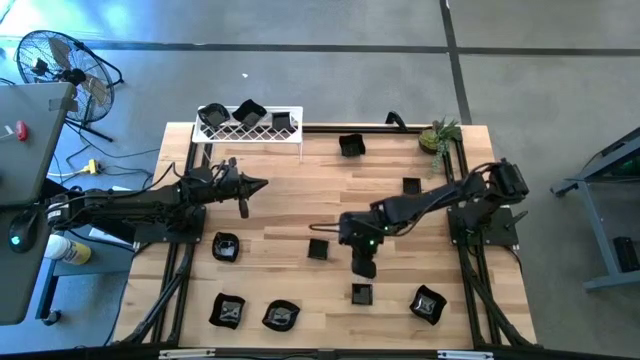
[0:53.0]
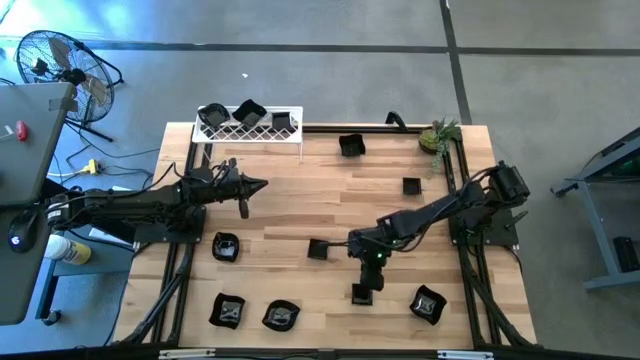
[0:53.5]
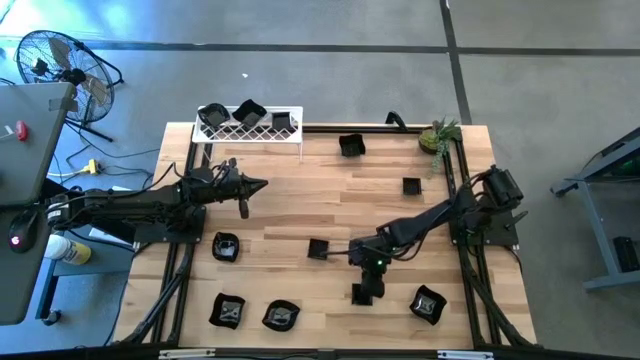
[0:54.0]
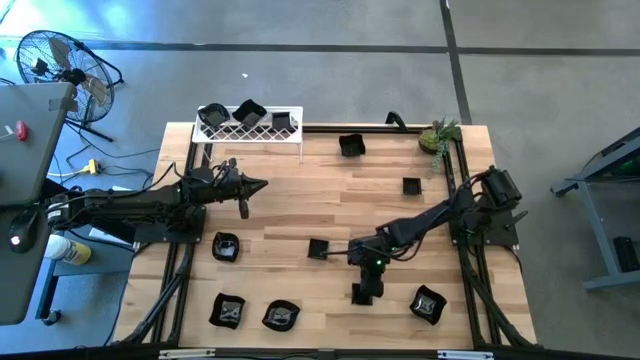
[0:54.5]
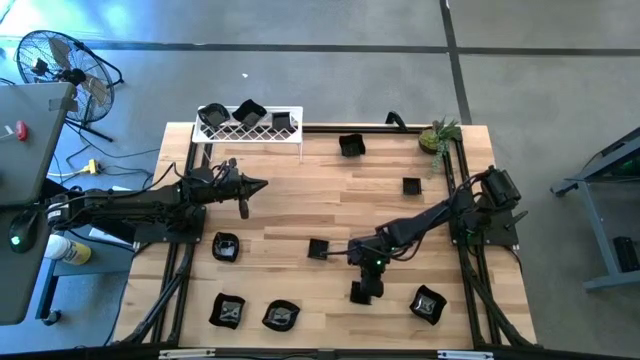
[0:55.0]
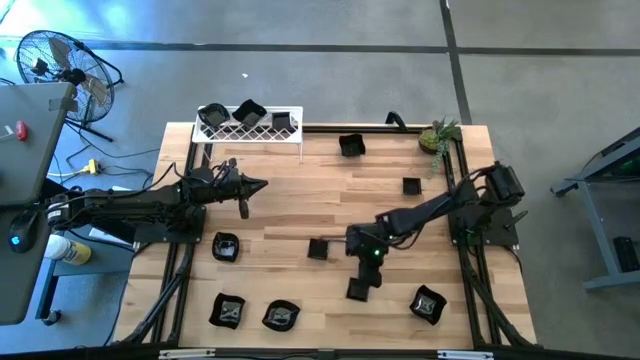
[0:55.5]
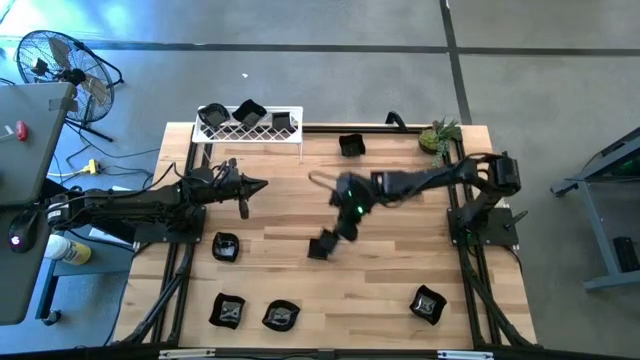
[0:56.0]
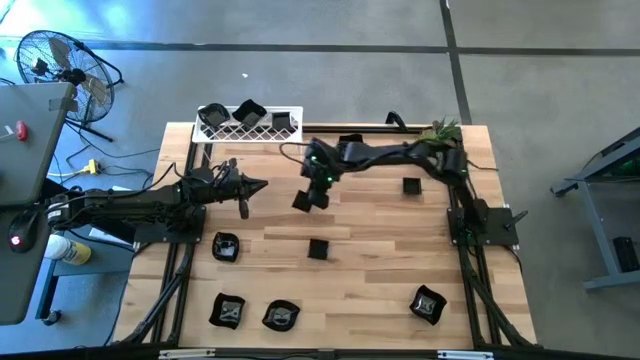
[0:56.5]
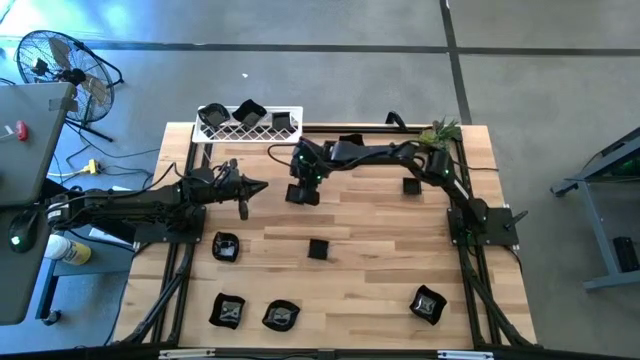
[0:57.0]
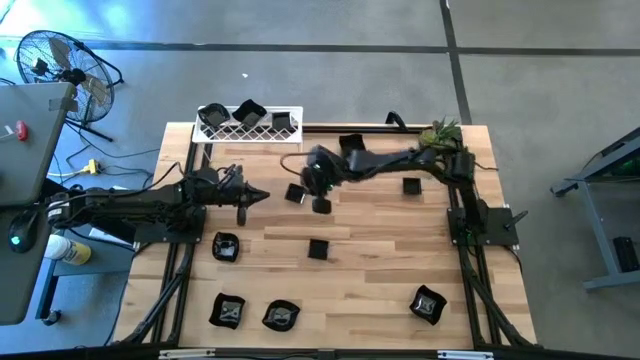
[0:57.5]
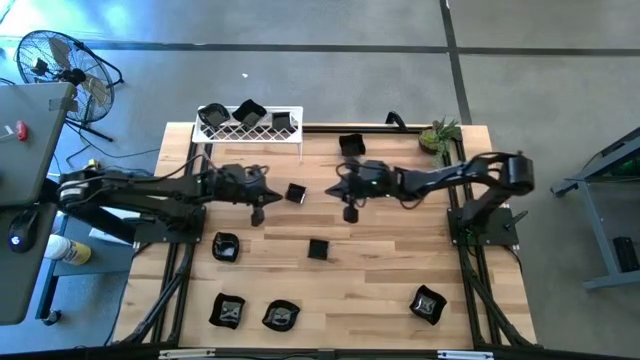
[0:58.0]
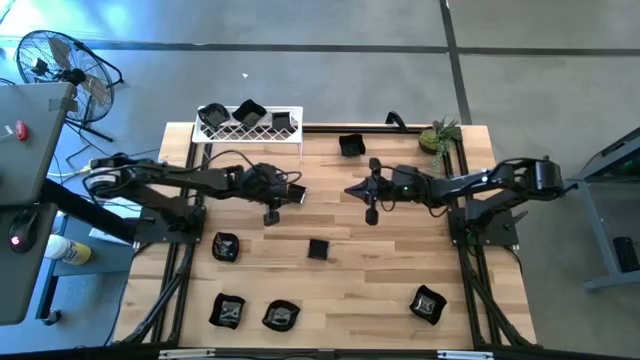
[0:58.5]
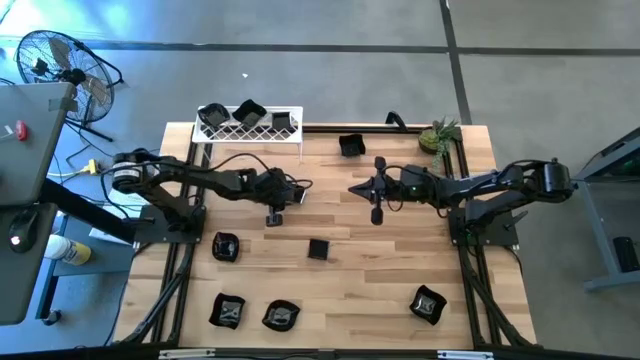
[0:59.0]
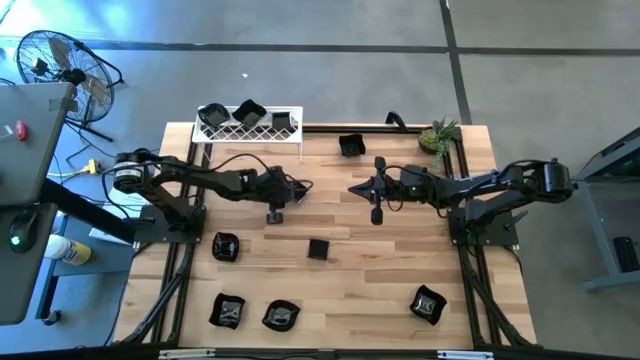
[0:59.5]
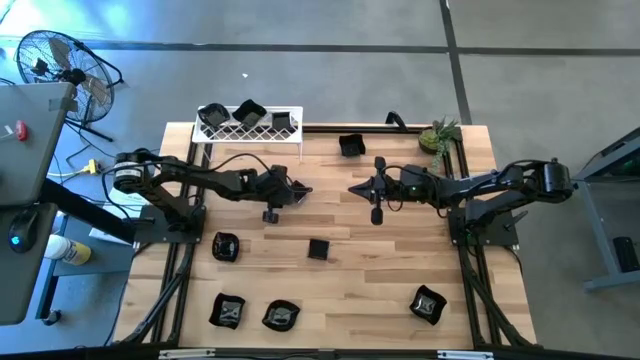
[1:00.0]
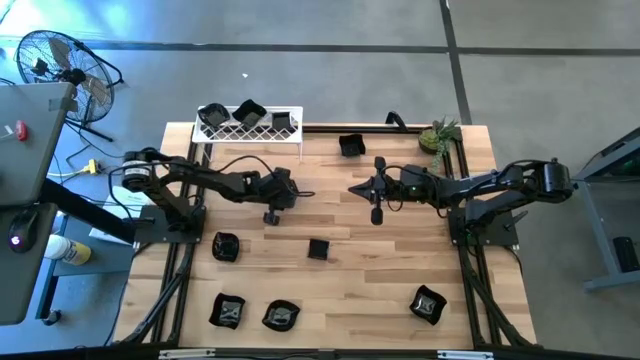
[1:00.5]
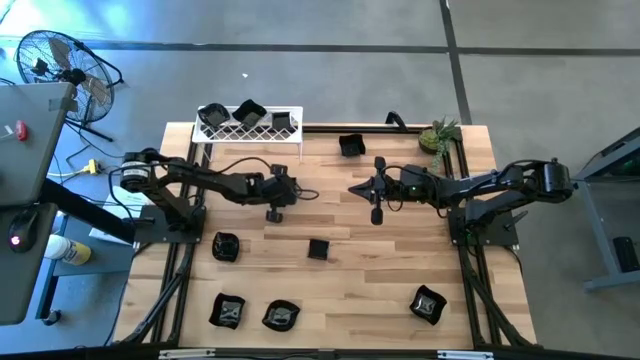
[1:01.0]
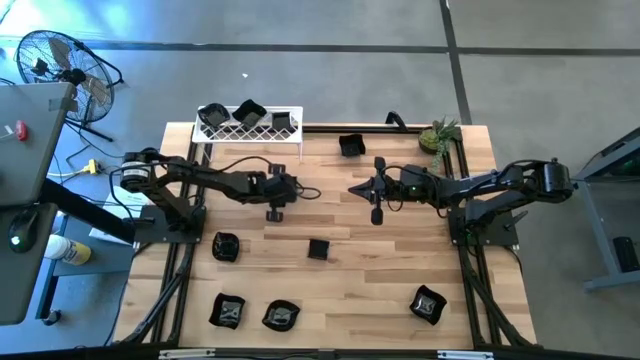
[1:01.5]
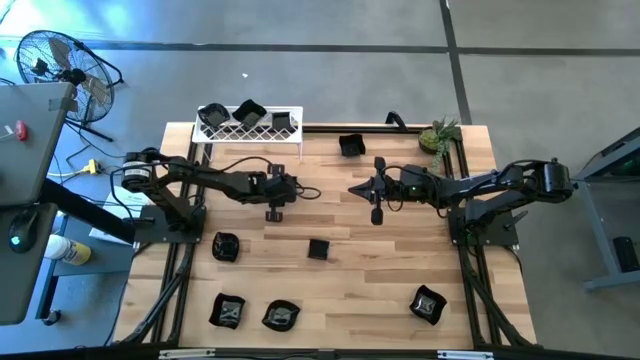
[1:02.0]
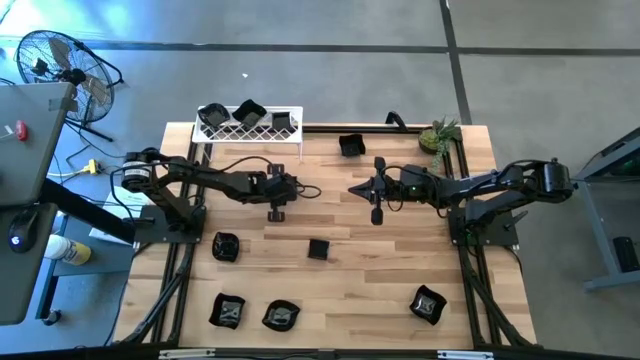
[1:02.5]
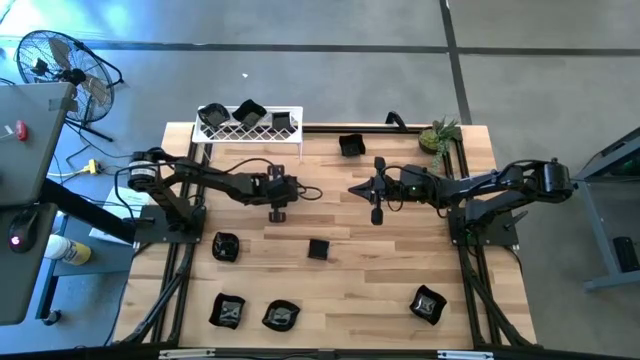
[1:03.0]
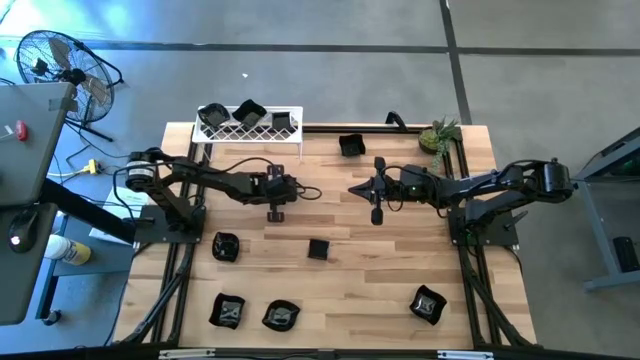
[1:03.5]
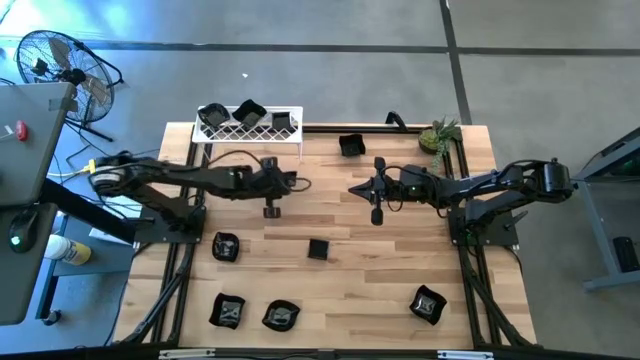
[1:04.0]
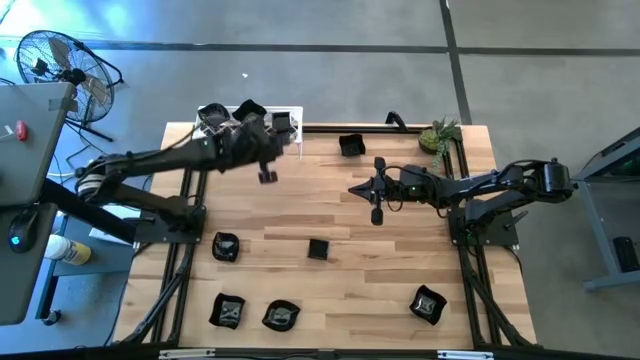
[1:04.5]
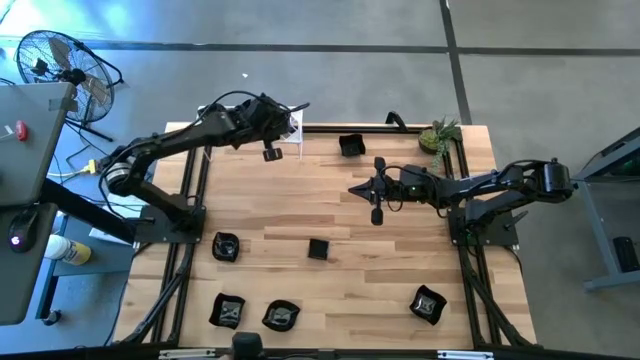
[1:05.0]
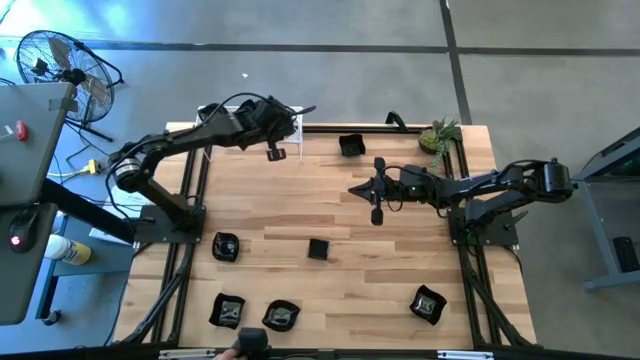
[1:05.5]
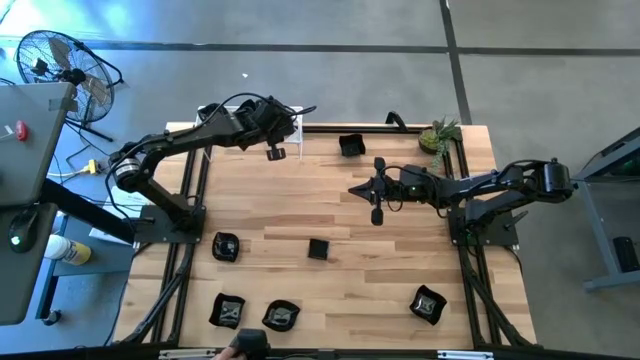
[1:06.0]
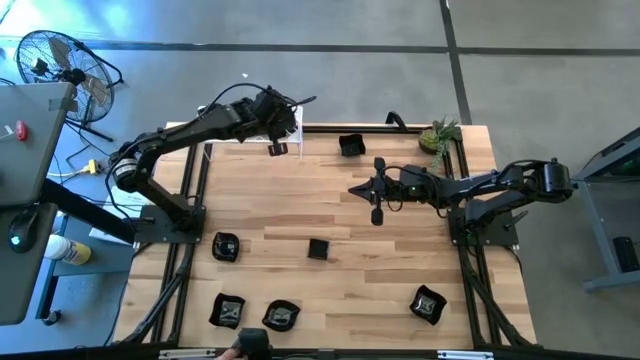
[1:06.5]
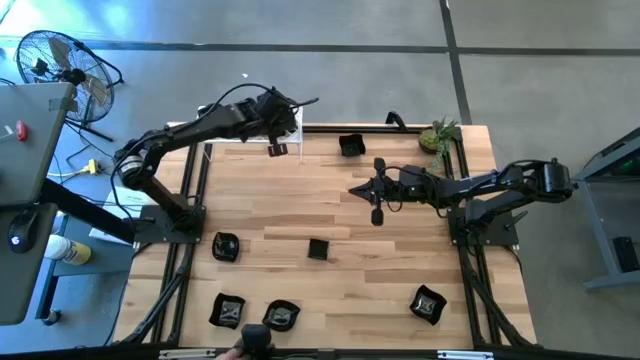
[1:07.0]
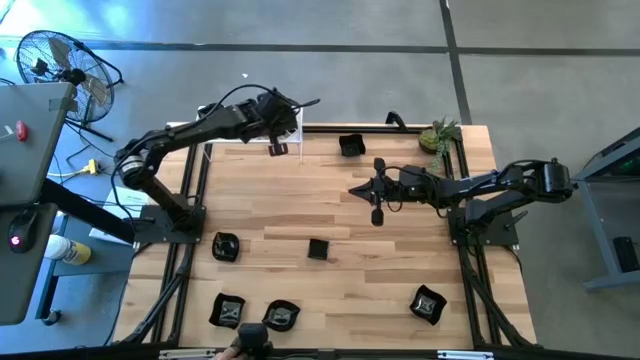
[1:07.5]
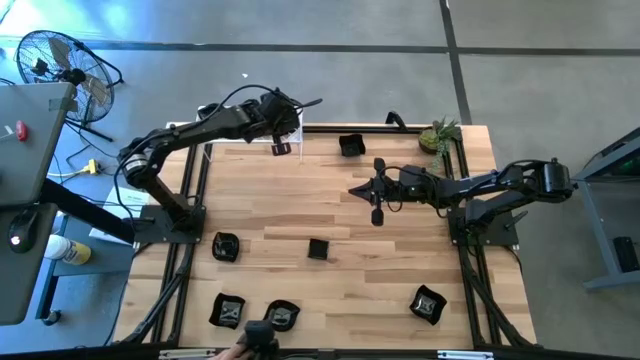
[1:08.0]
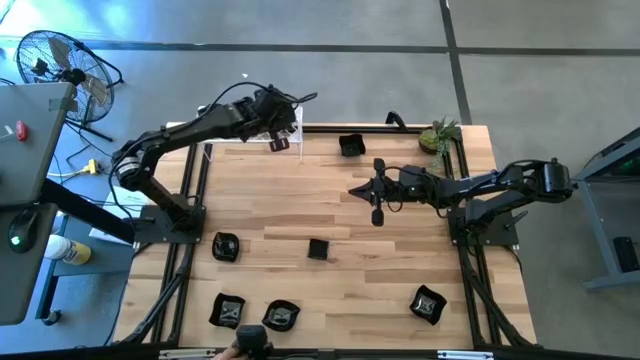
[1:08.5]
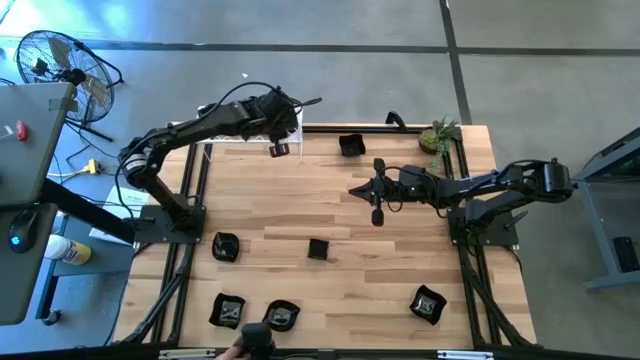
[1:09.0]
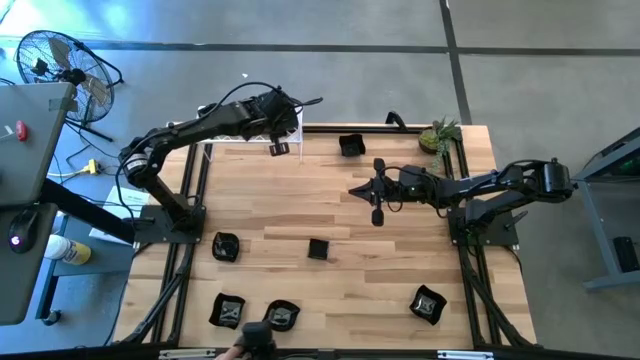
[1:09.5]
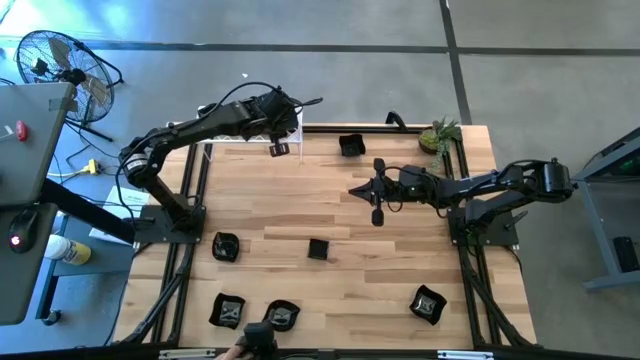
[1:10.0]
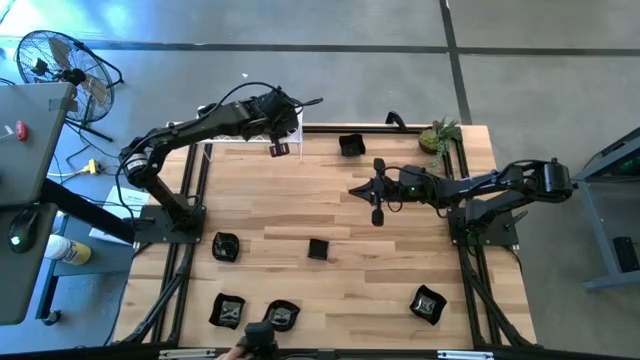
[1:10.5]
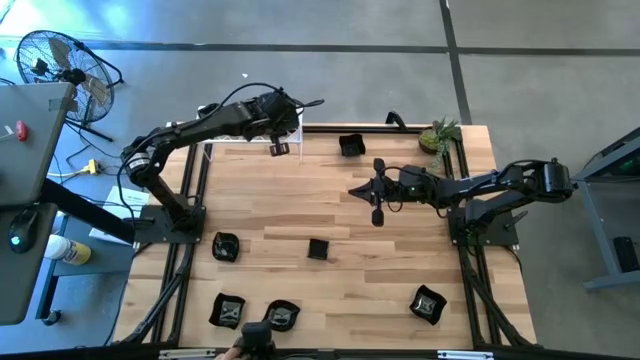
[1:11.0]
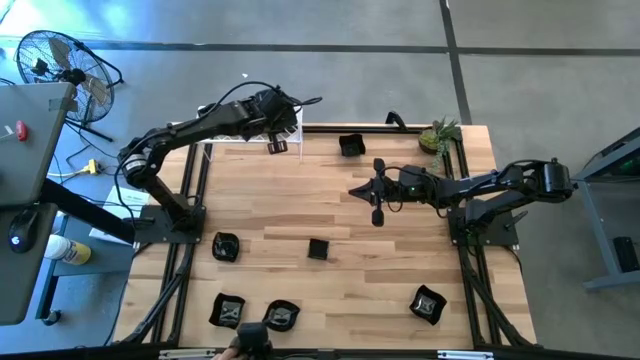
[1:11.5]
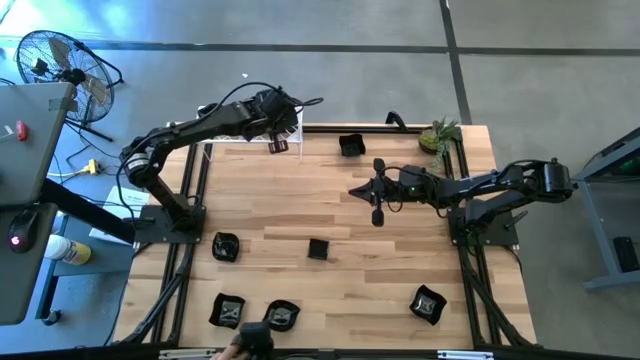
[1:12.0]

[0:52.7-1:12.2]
Task: Pick & Place Mini shaped plates
Stack the black square plate on top of the black square plate on the shelf
